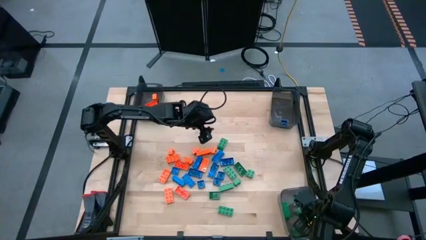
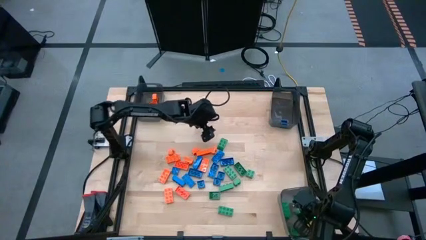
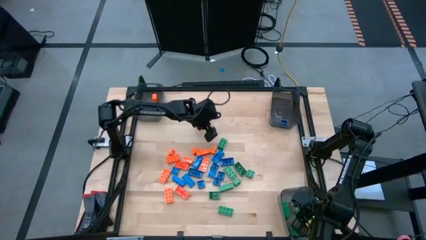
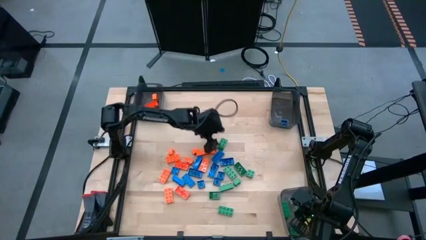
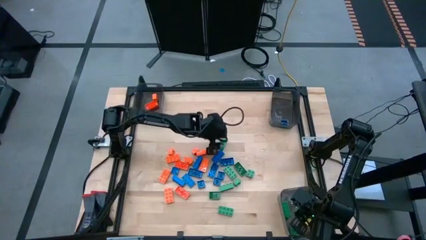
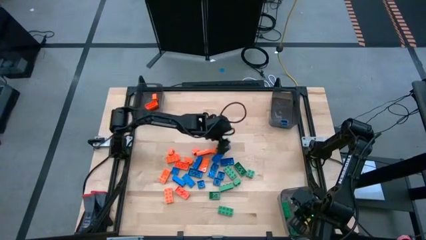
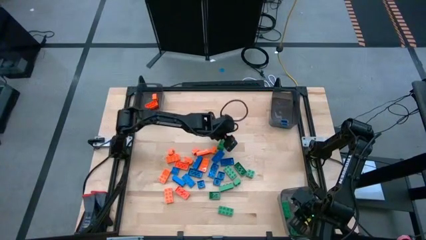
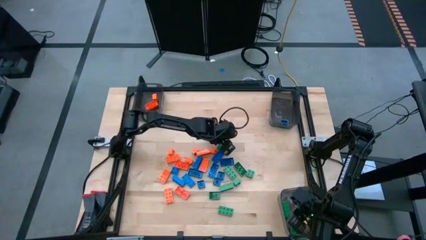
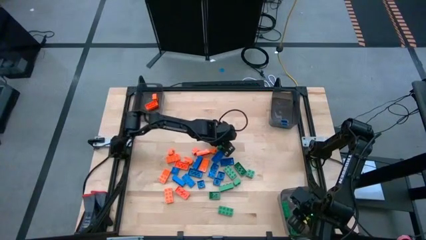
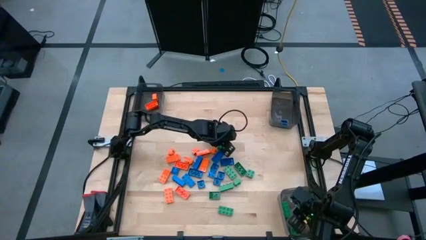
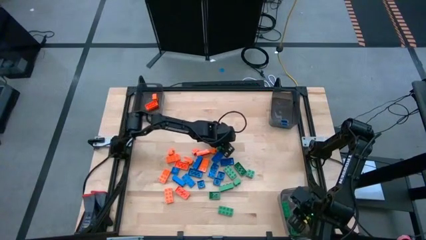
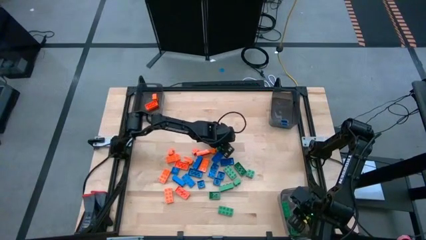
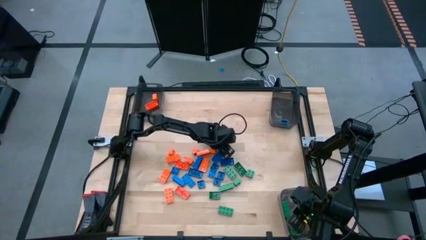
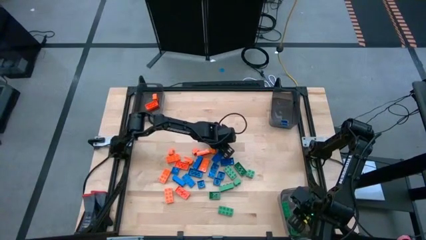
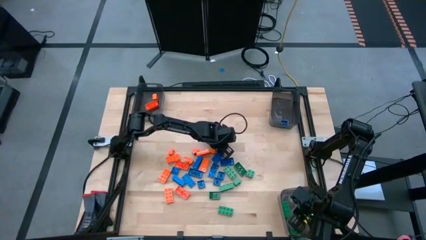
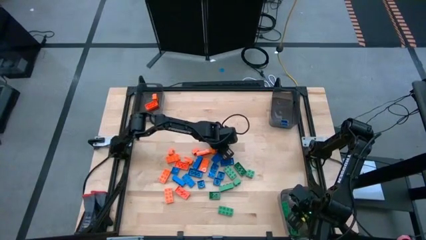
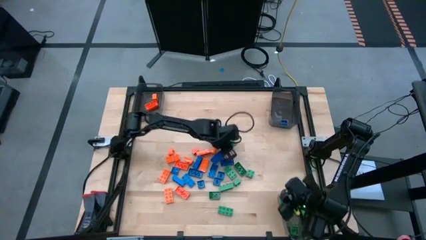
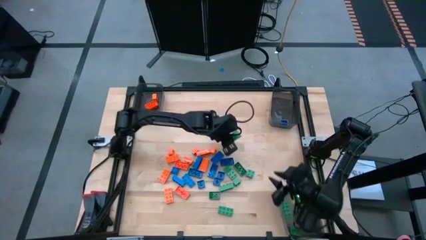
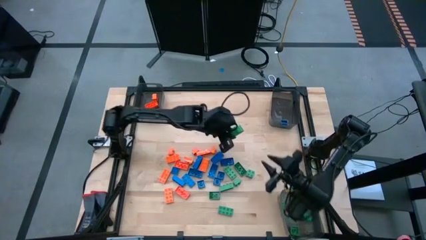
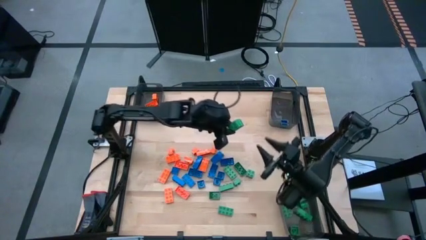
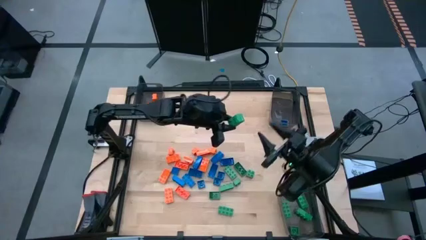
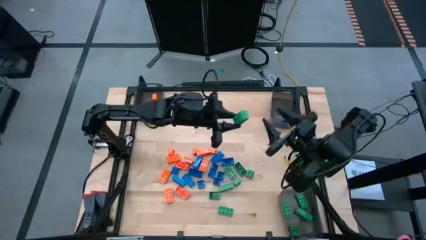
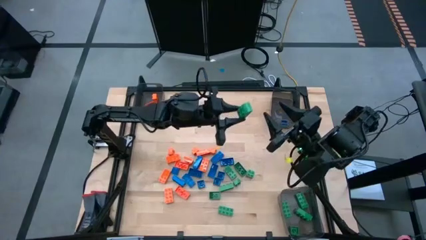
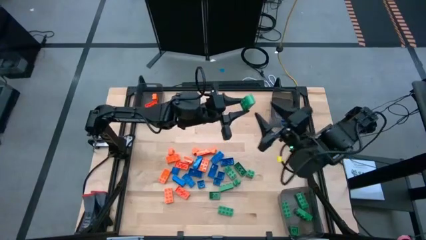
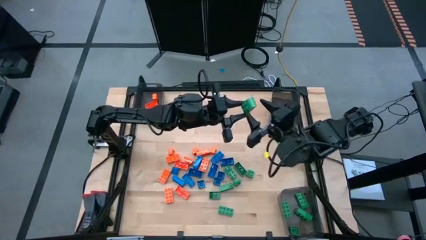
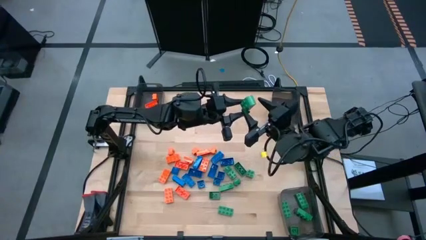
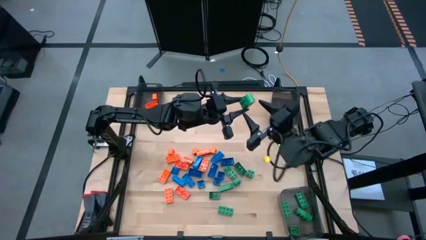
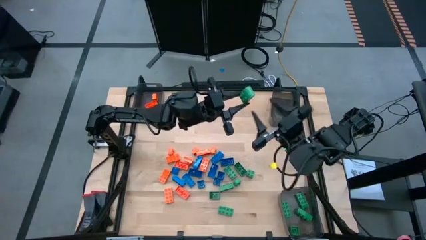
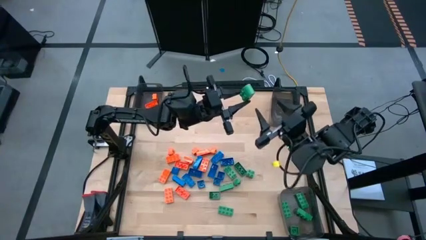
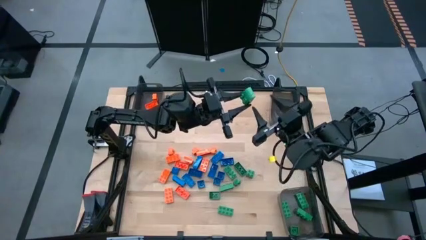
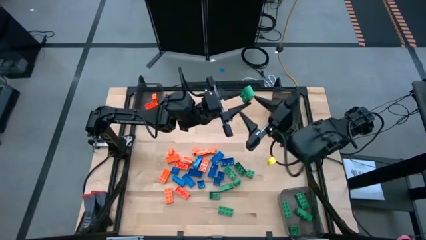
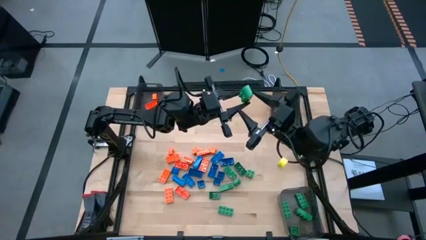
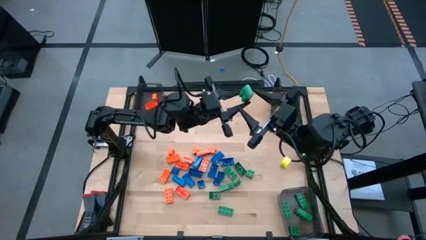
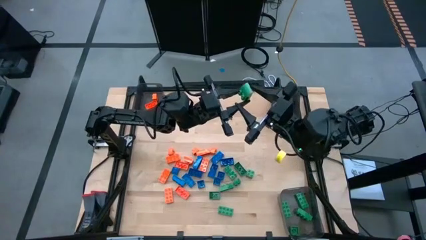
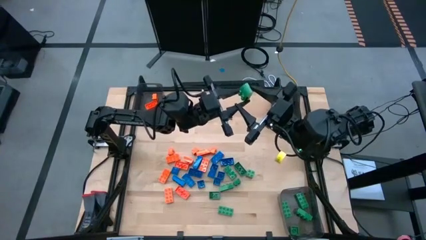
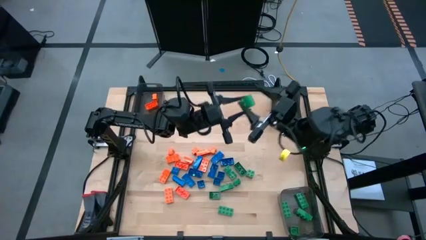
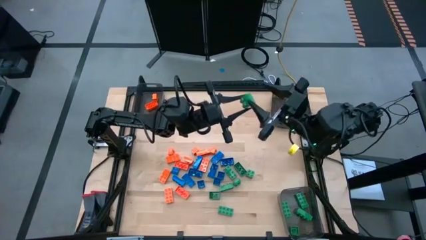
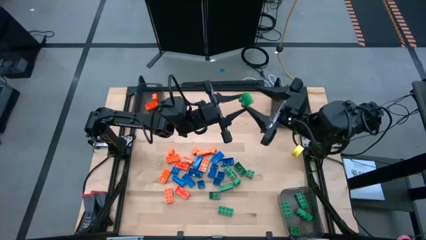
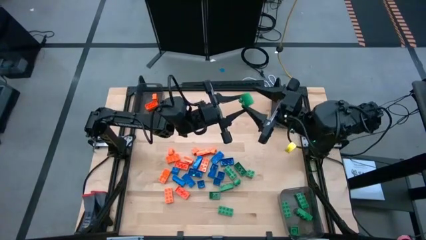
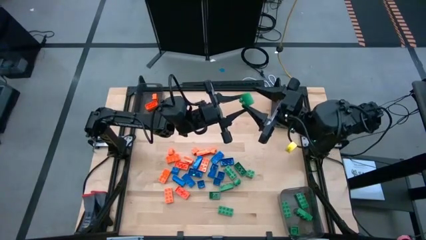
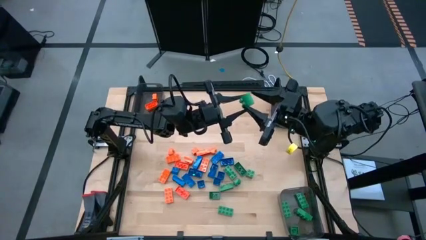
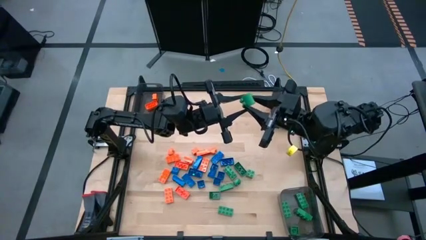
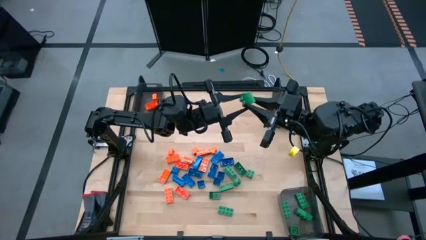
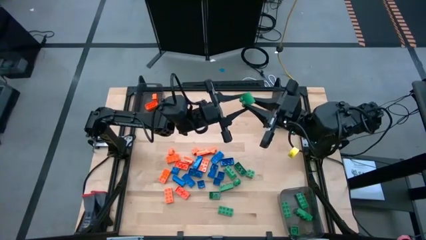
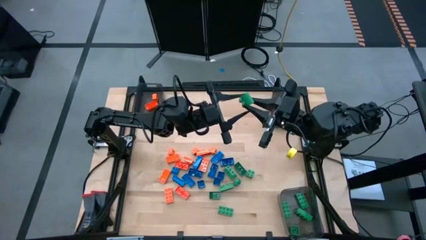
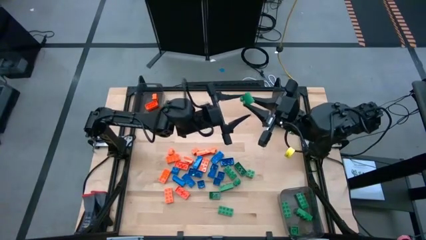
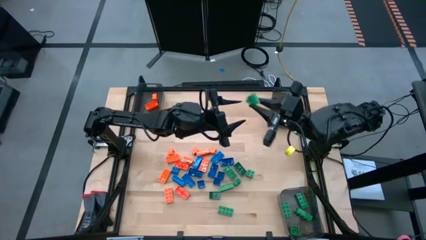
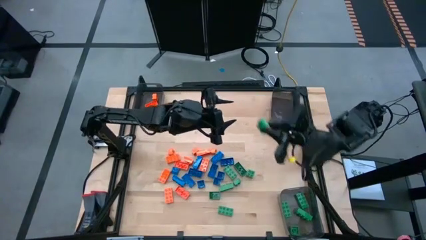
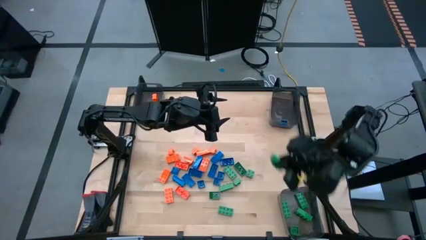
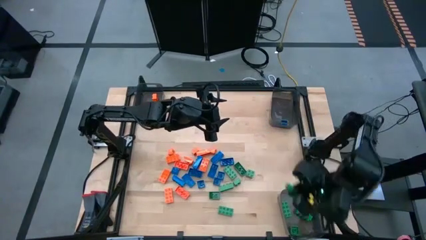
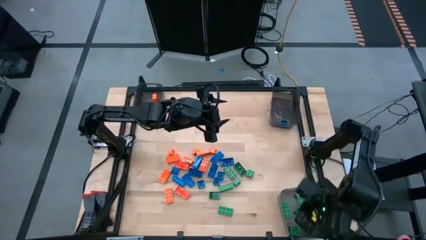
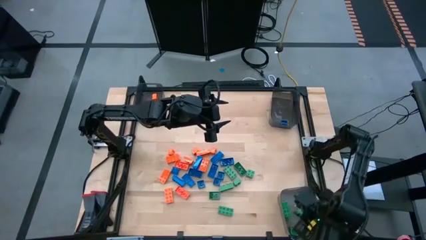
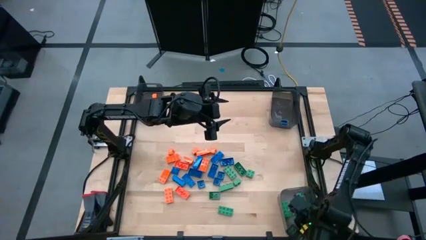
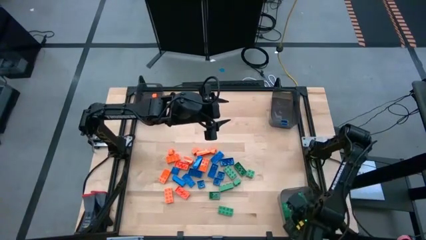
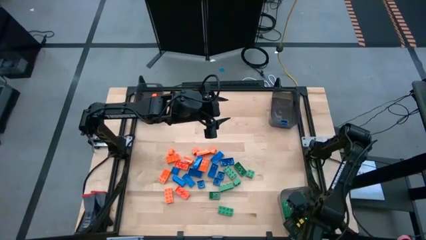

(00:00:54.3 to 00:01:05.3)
Task: Sort blocks
Put the green game piece into the bottom right black bin

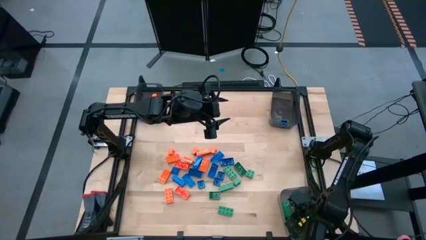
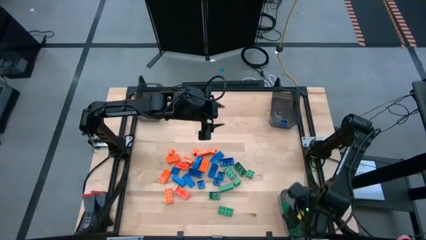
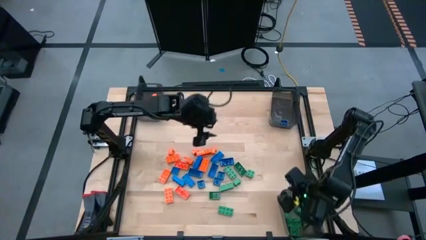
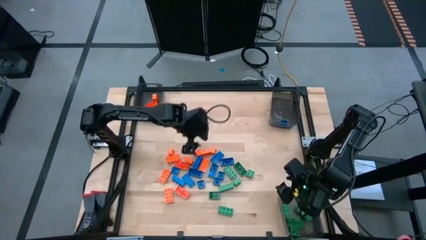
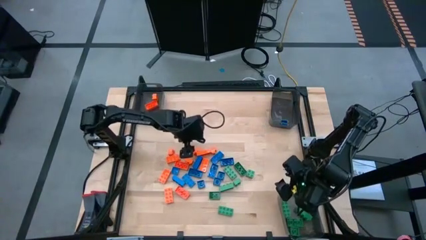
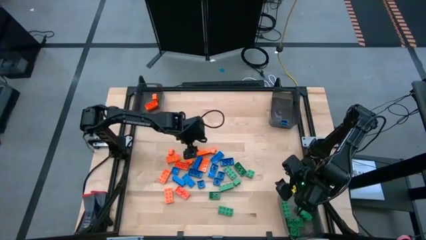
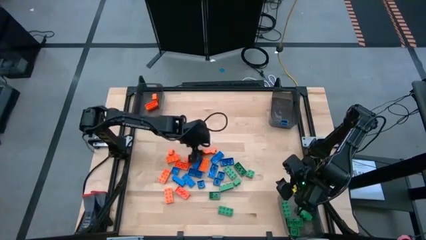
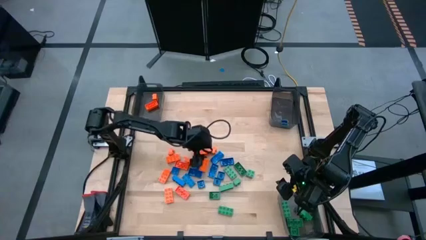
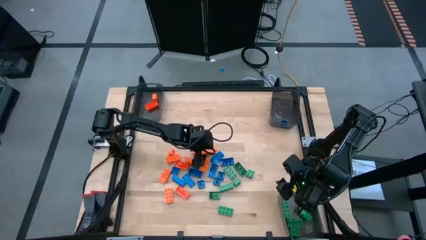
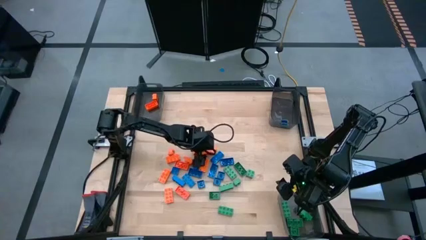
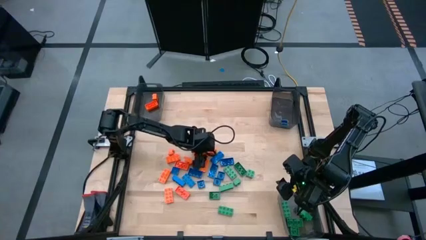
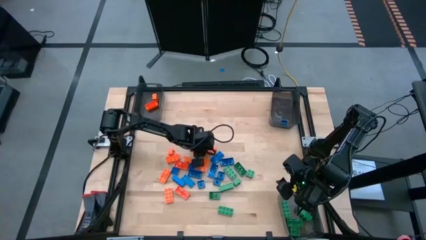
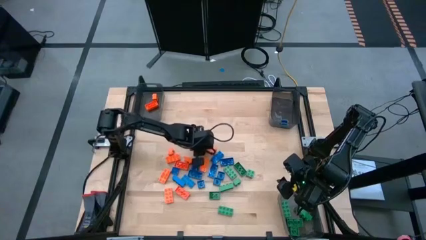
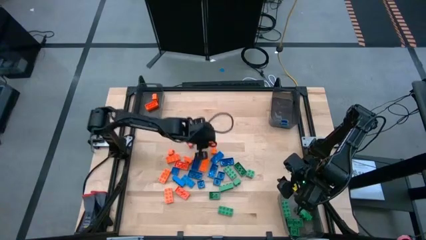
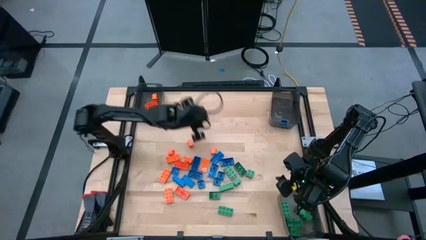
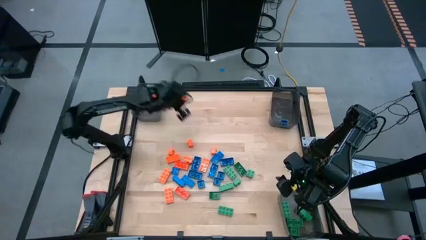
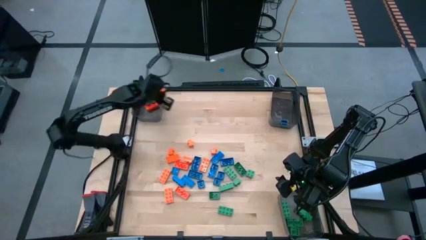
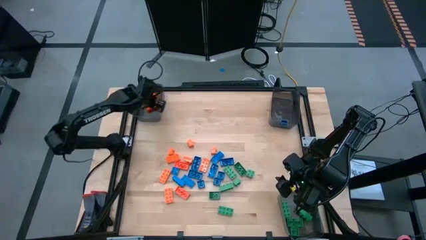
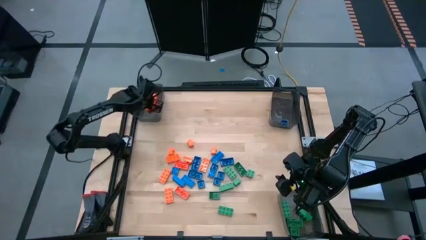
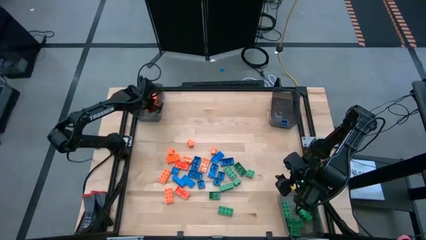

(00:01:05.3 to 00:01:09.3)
Put the orange game piece into the top left black bin

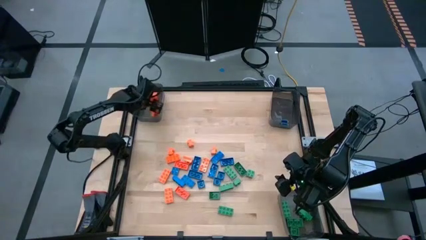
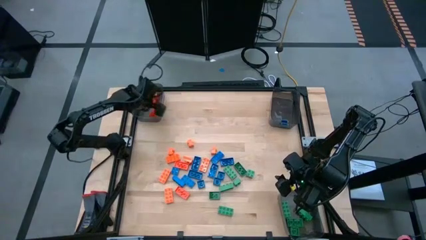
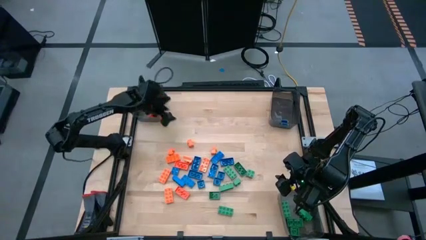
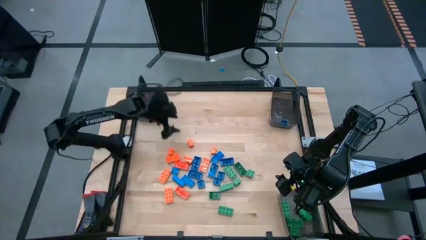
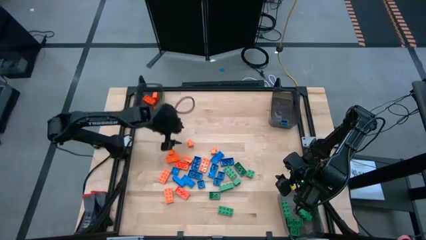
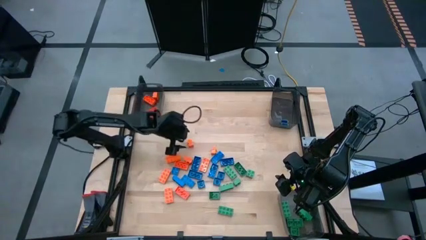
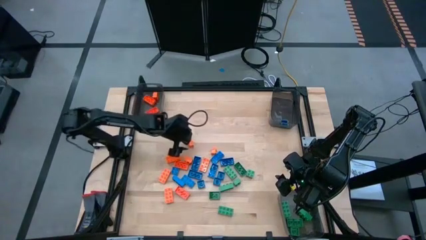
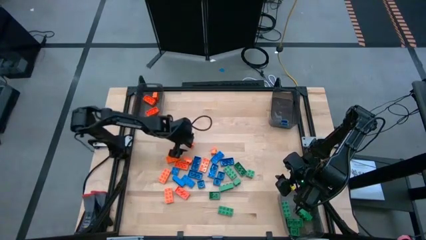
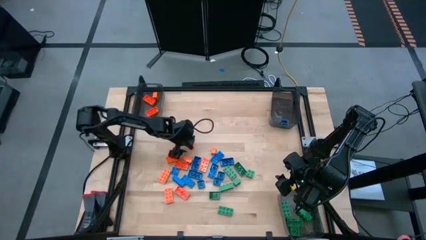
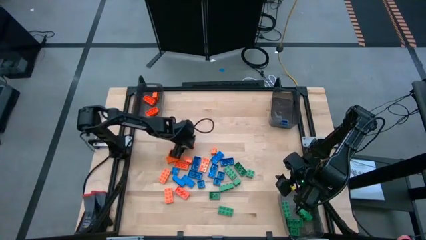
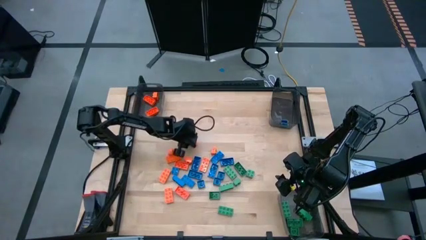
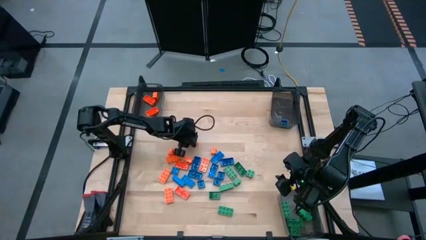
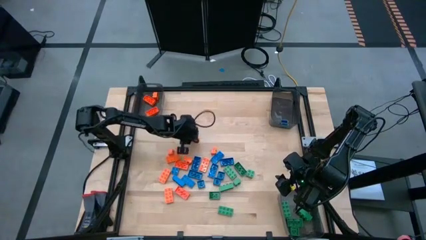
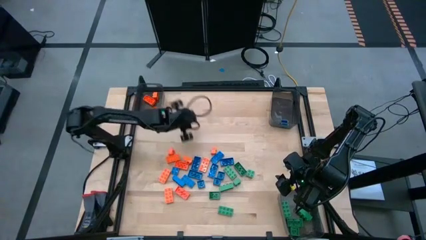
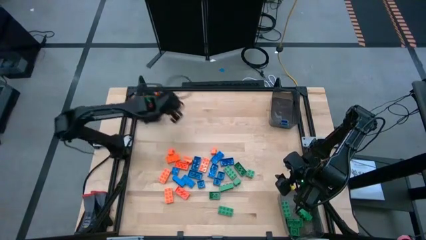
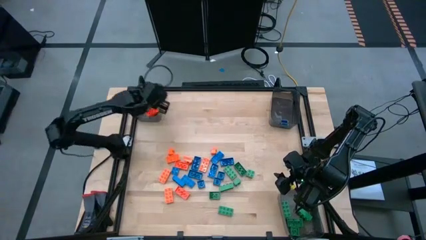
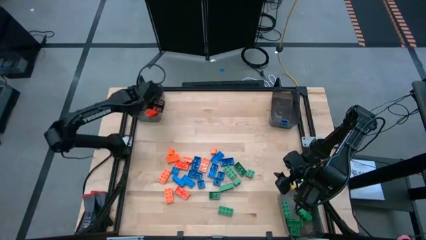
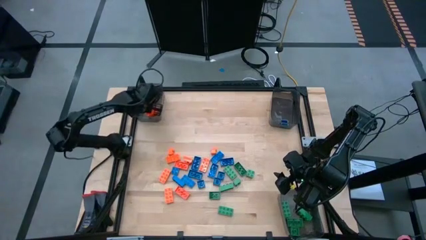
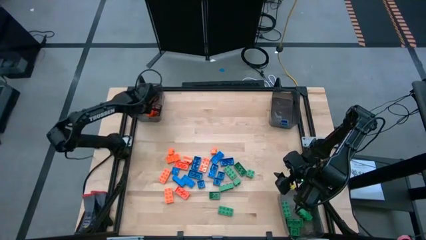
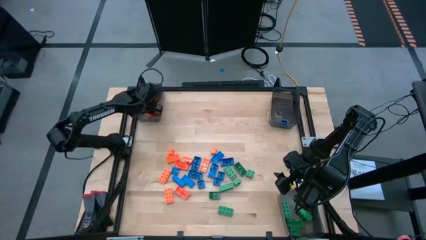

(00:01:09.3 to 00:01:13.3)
Put the orange game piece into the top left black bin
